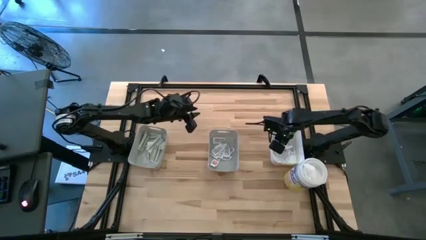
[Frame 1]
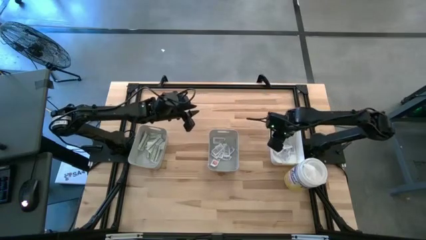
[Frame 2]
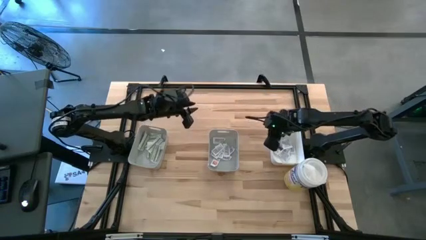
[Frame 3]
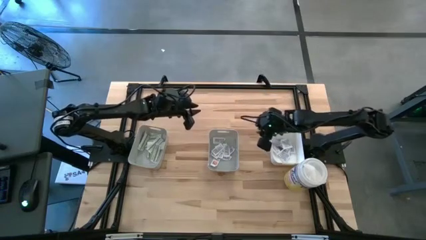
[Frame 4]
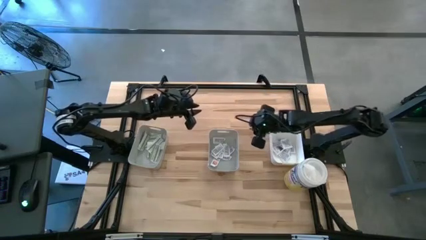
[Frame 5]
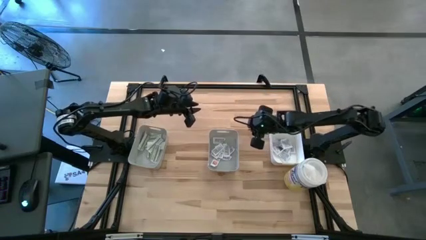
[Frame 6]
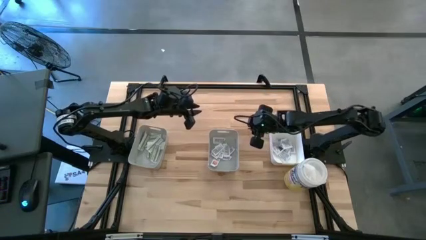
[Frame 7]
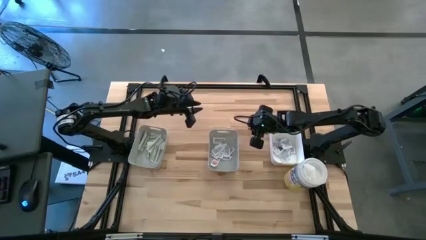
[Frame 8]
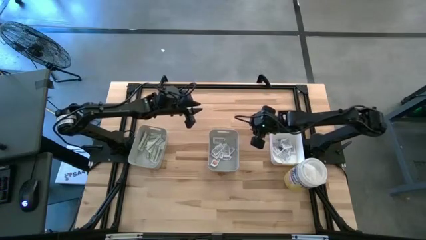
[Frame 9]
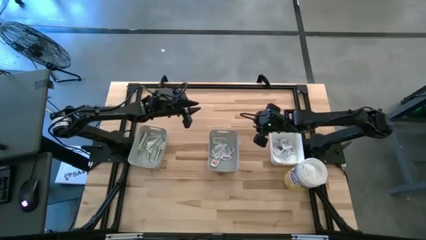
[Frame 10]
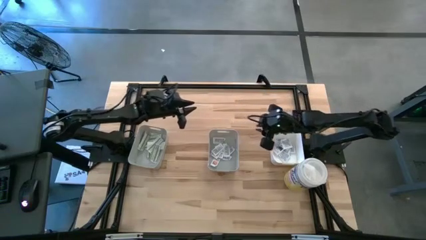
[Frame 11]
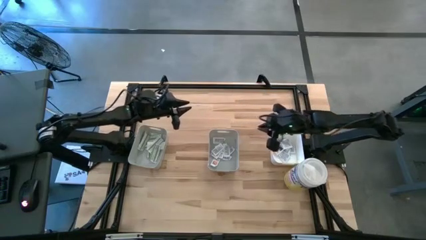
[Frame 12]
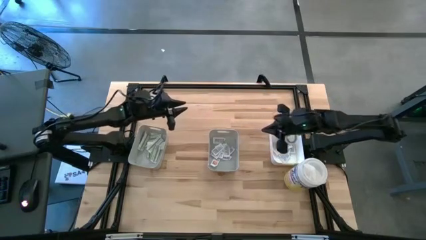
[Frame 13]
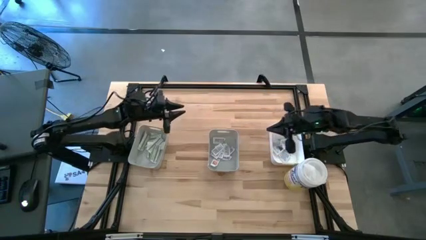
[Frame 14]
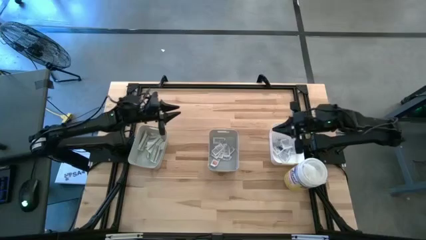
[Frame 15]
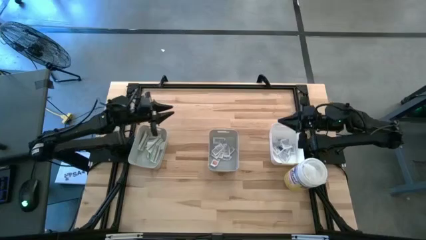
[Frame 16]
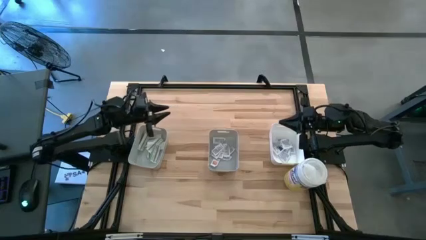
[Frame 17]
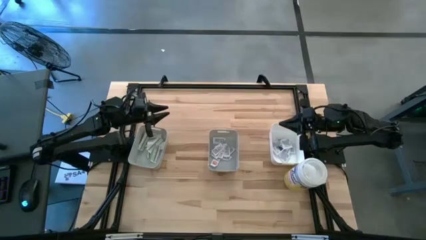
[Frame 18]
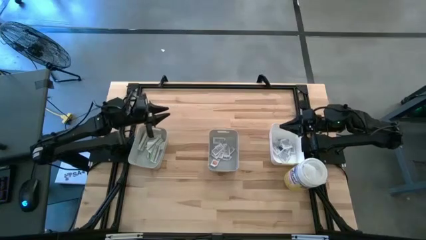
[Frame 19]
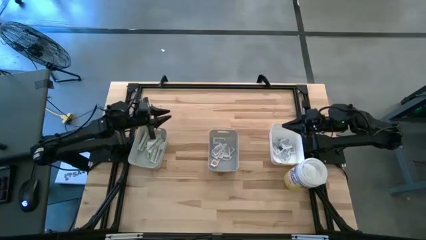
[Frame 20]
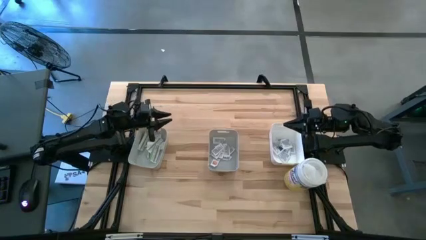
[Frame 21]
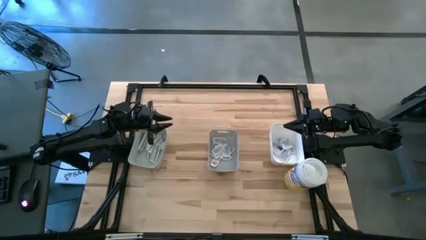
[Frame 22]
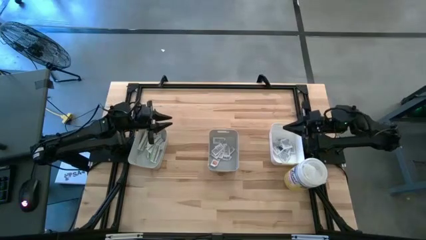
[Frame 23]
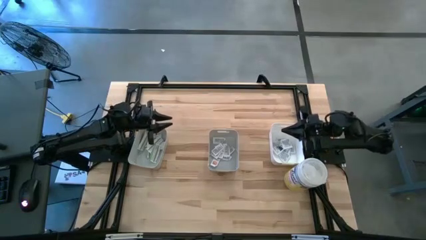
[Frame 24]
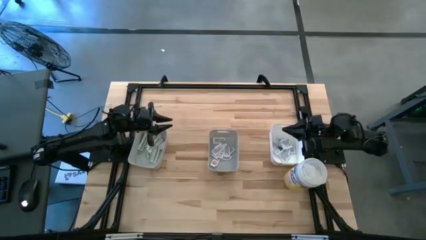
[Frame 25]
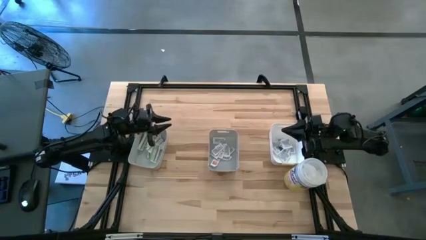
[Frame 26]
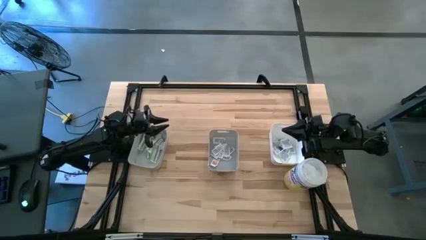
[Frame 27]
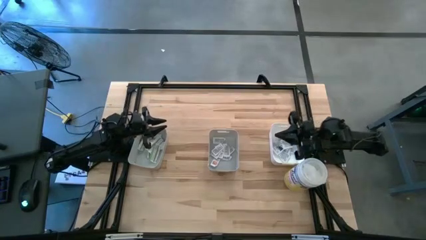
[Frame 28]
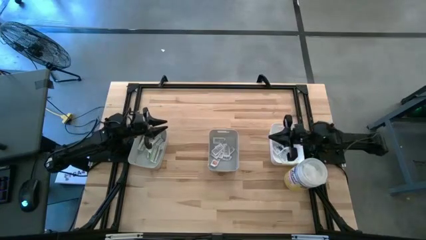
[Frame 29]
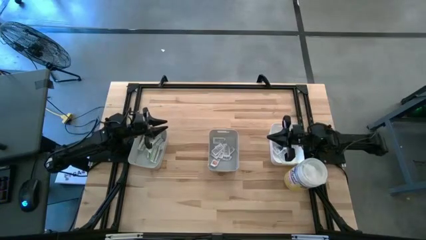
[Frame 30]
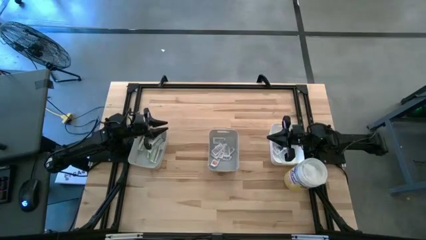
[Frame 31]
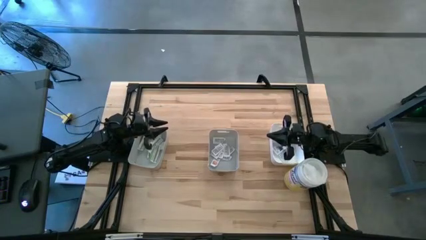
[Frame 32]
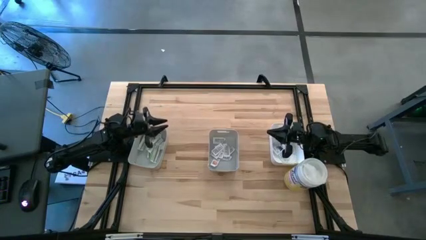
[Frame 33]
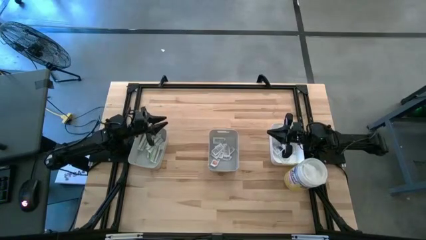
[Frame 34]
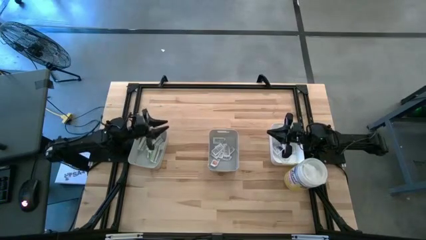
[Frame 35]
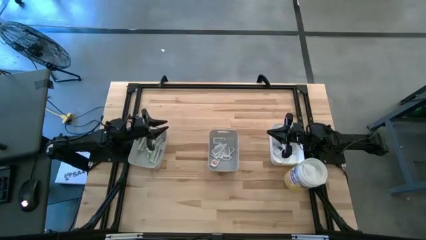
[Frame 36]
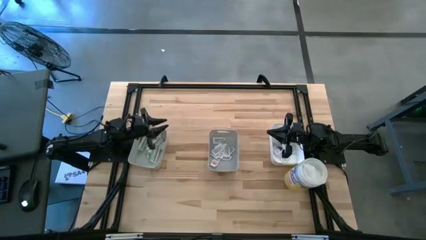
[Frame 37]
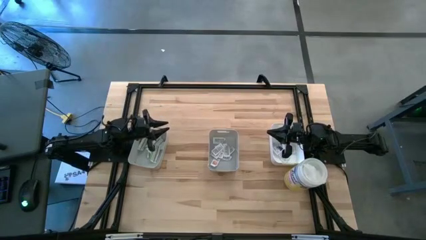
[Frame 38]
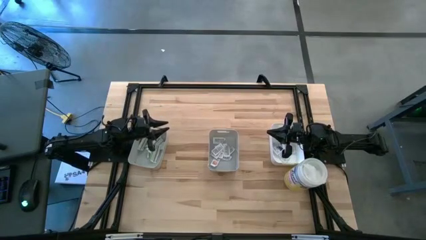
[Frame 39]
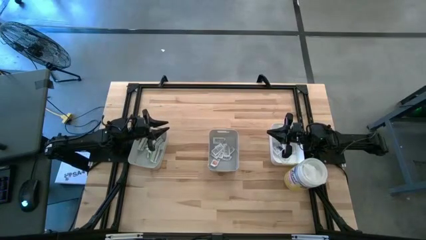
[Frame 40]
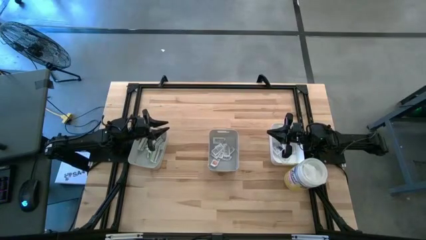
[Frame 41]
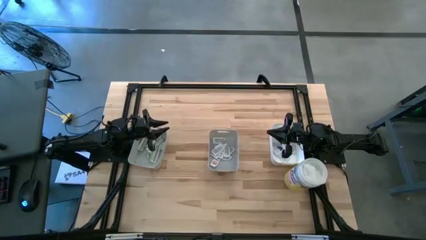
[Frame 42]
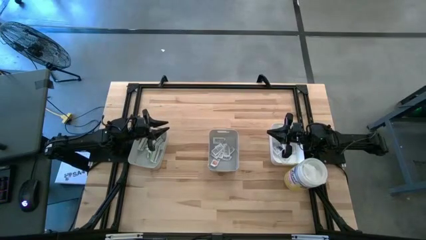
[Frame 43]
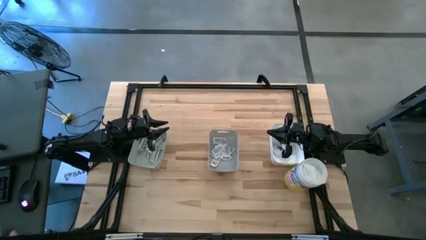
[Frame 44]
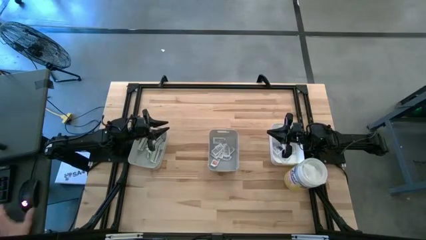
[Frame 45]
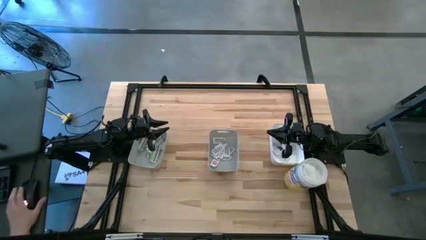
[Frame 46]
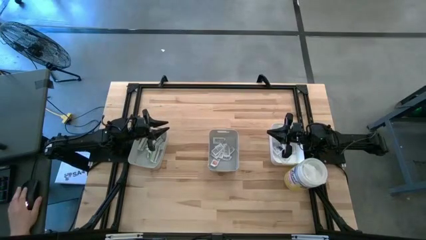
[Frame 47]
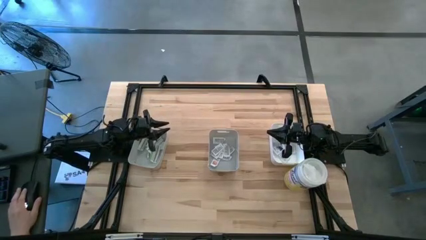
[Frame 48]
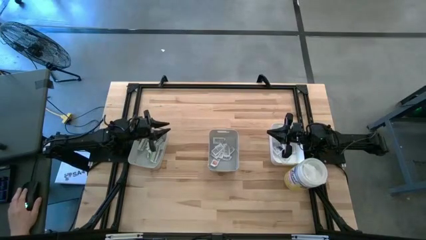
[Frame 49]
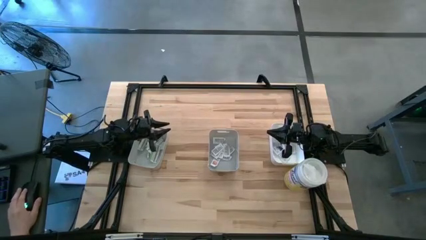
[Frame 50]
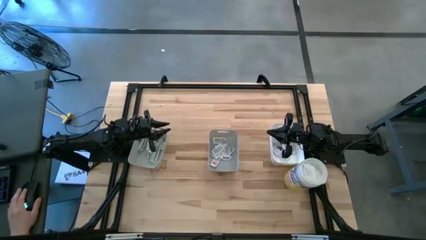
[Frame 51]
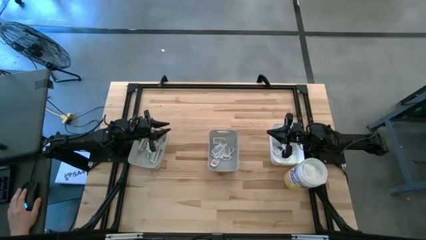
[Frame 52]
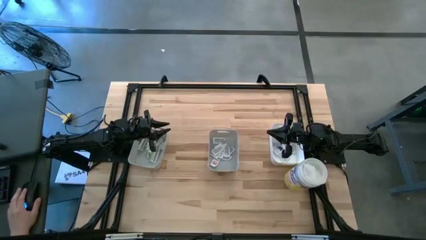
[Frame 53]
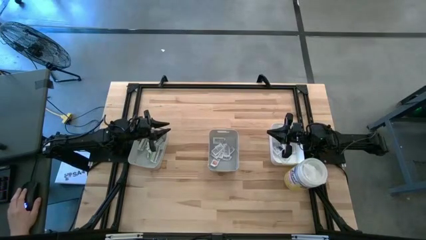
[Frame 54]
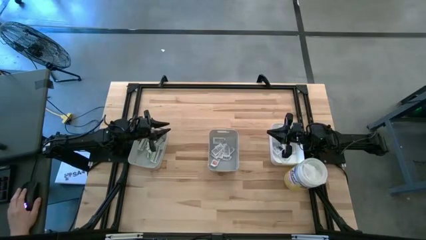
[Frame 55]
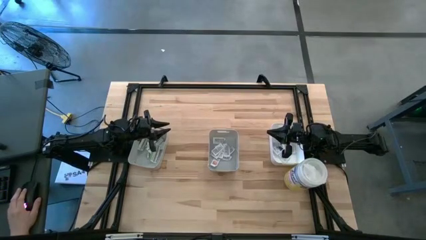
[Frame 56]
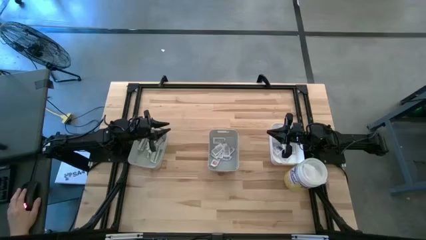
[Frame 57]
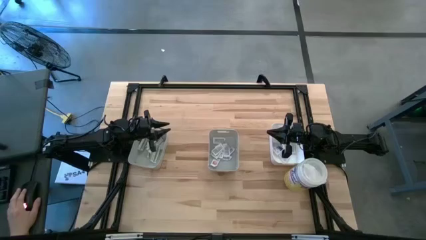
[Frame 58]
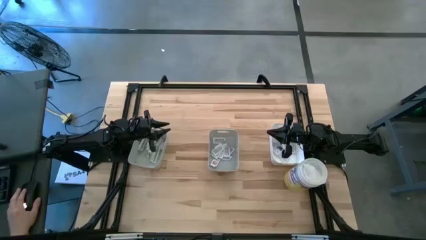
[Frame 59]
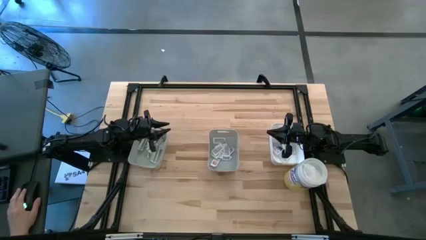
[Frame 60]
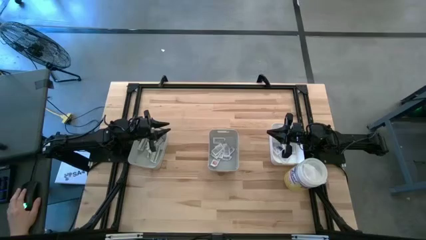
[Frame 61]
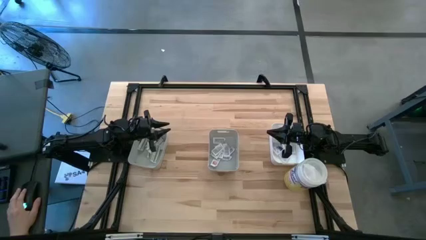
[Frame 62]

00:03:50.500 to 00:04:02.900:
Task: Pick & Place First Aid Supplies
Return to Home Position

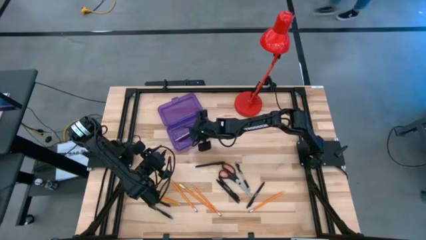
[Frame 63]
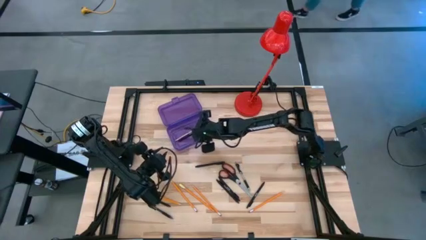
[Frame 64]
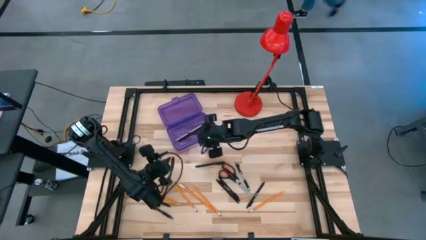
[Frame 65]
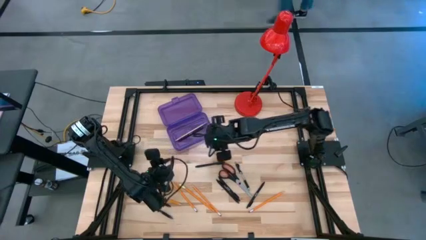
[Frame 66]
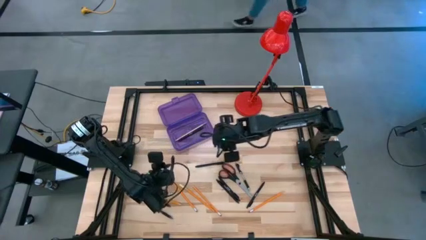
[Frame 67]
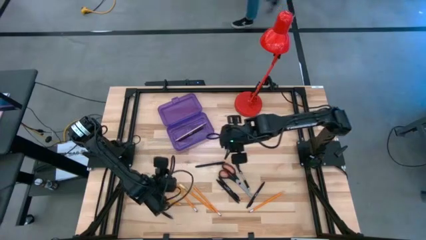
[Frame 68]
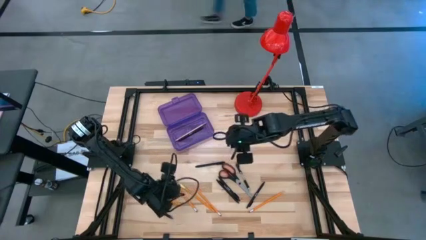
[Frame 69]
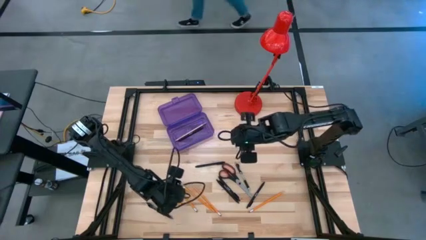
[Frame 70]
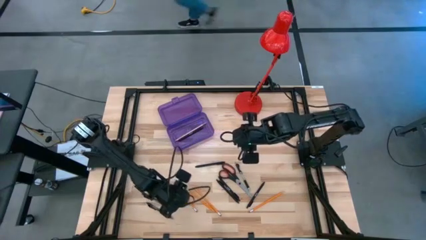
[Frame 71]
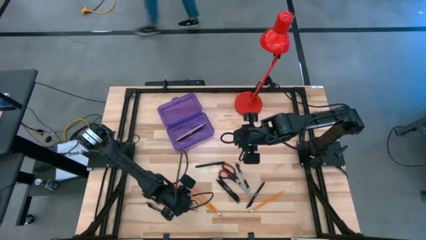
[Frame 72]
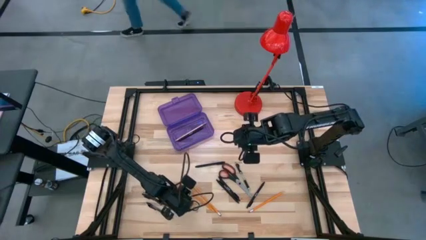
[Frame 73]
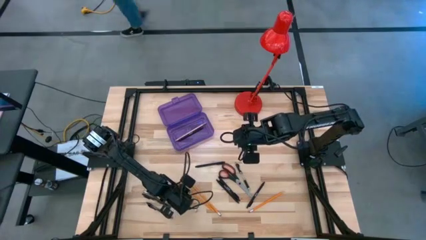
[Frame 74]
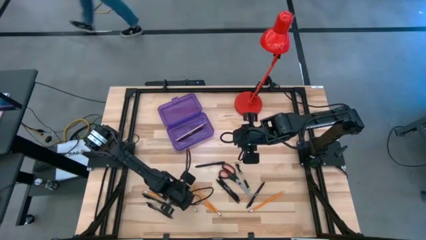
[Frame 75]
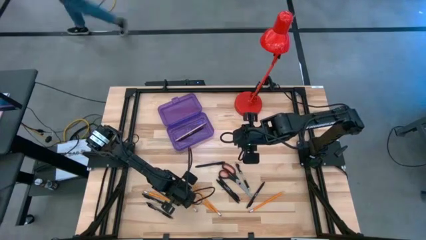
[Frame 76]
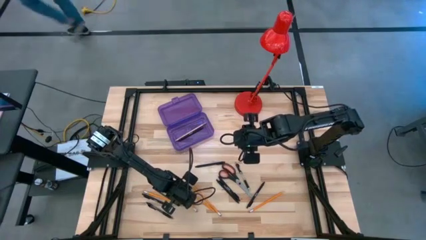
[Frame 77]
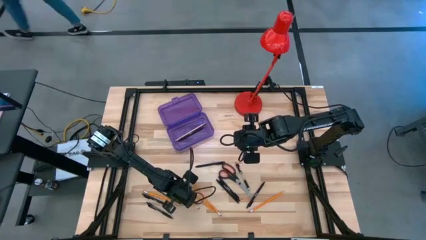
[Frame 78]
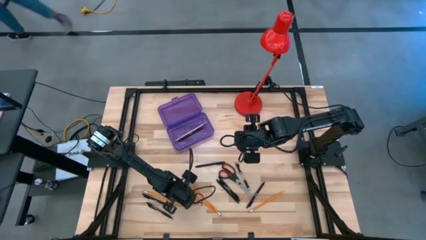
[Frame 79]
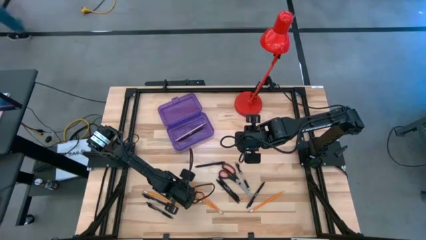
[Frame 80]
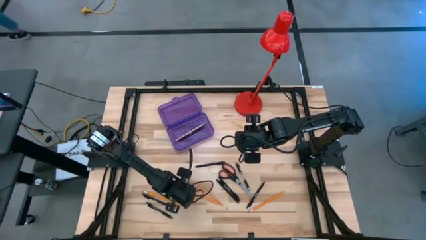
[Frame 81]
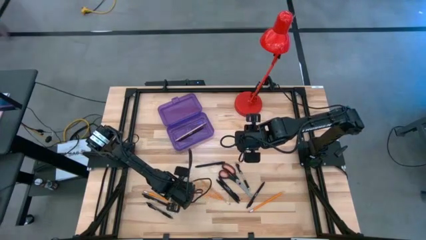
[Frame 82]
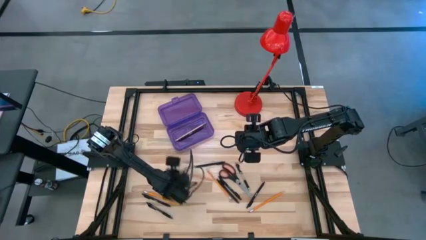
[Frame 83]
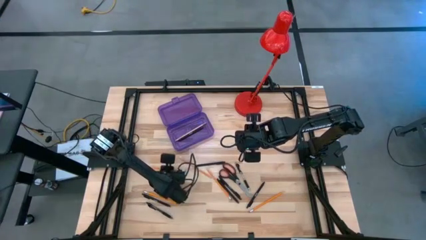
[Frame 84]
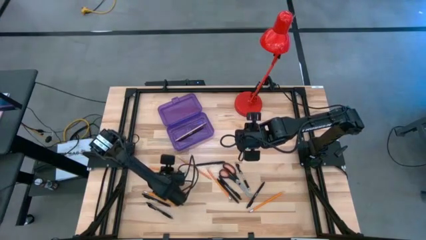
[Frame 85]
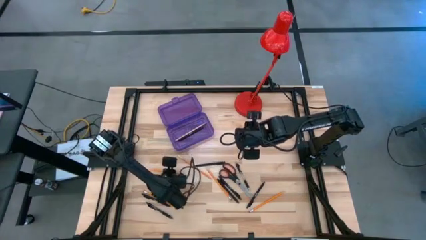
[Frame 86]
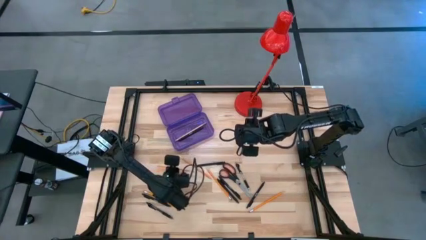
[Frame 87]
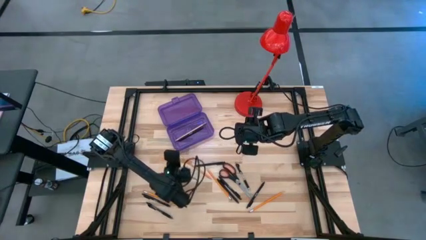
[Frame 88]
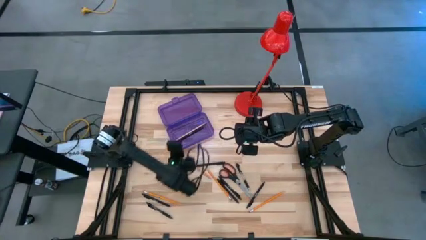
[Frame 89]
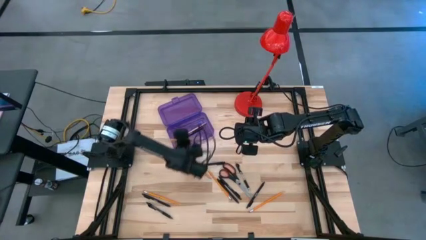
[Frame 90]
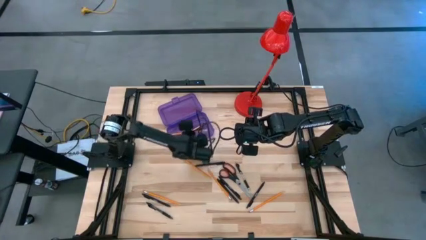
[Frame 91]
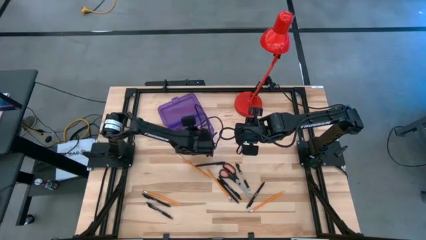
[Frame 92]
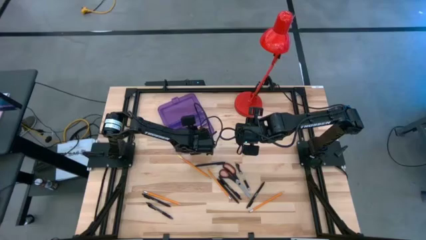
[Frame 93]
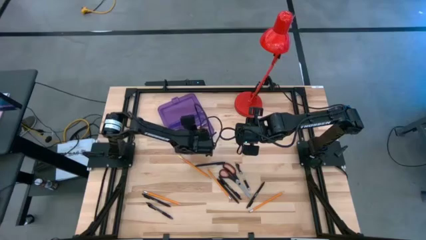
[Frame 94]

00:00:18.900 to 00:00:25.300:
Task: Pick & place school supplies into a supply box
Put the yellow pencil into the purple supply box
